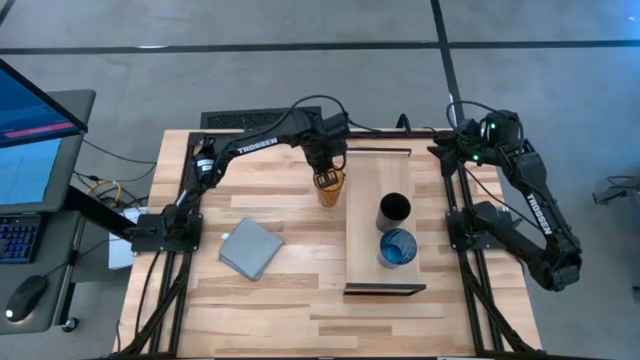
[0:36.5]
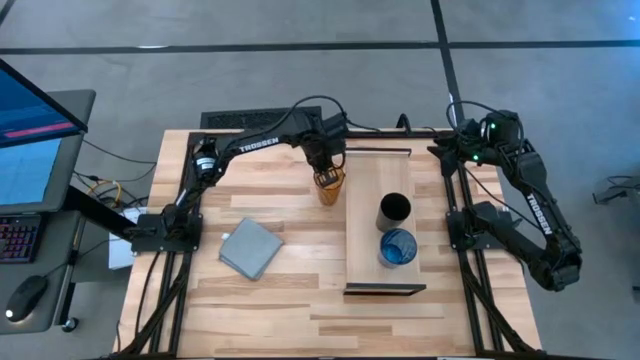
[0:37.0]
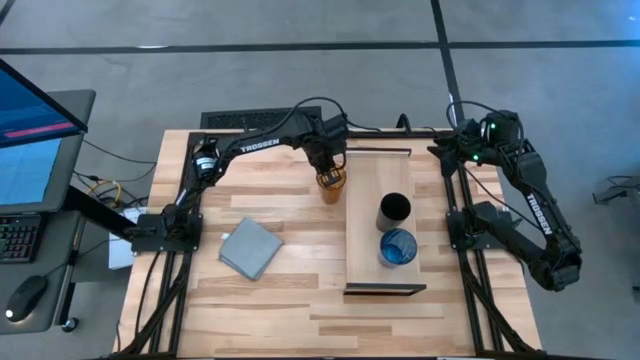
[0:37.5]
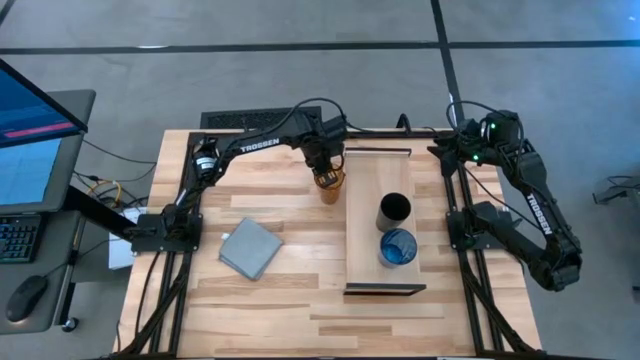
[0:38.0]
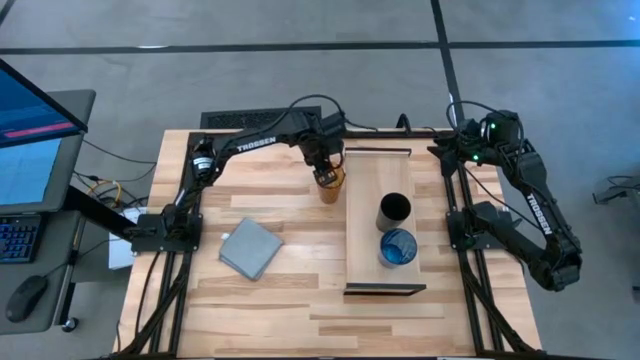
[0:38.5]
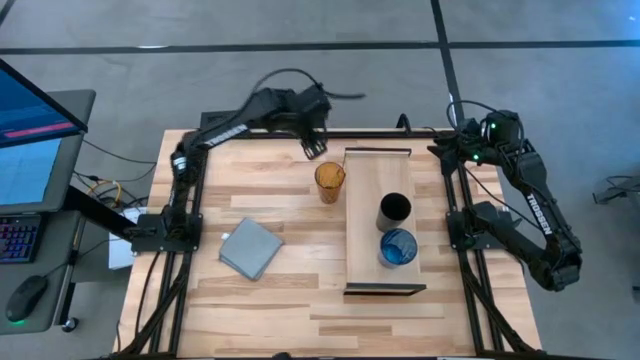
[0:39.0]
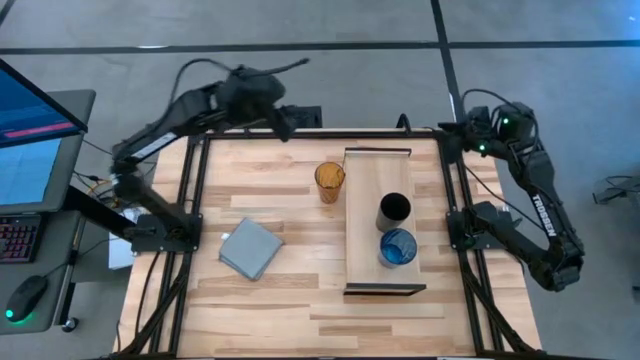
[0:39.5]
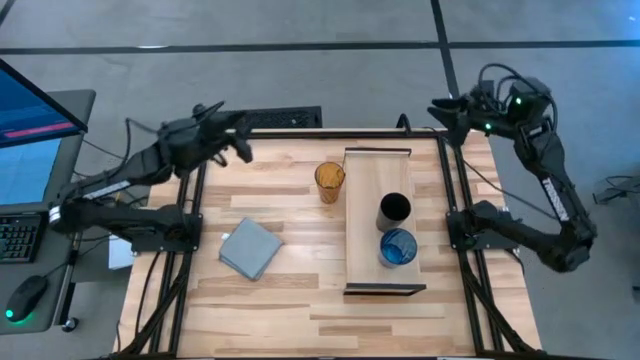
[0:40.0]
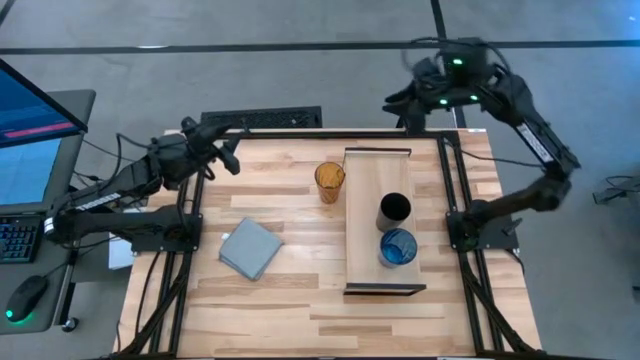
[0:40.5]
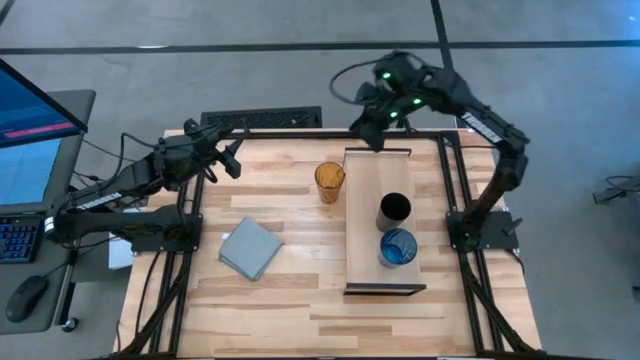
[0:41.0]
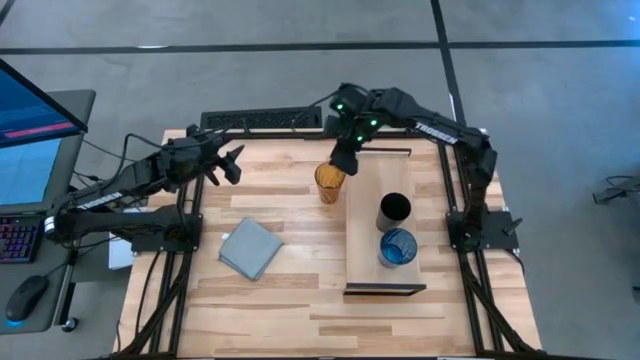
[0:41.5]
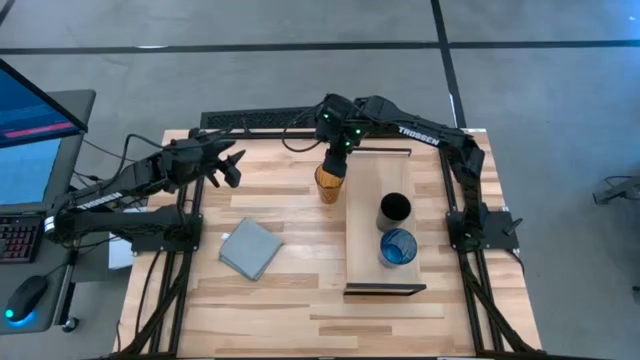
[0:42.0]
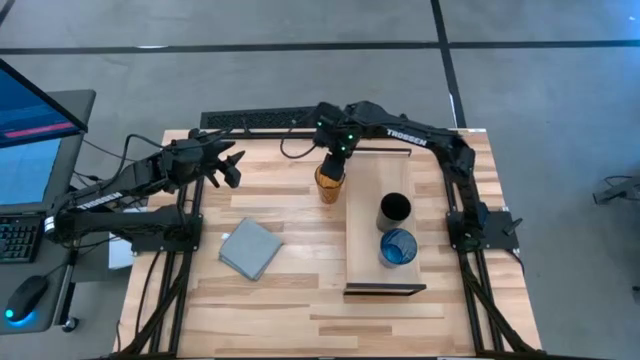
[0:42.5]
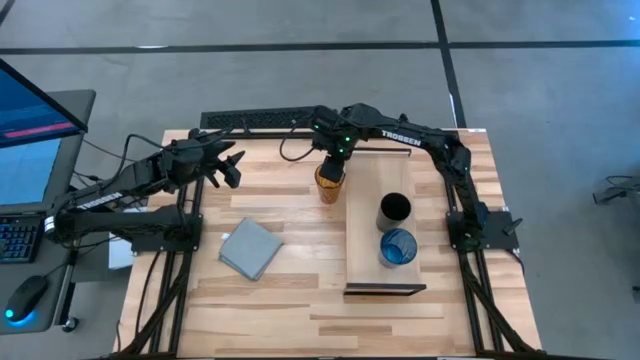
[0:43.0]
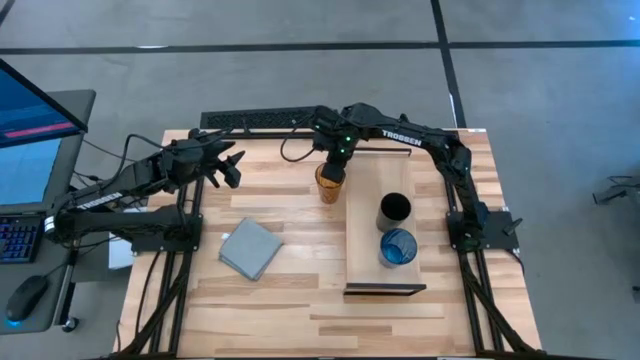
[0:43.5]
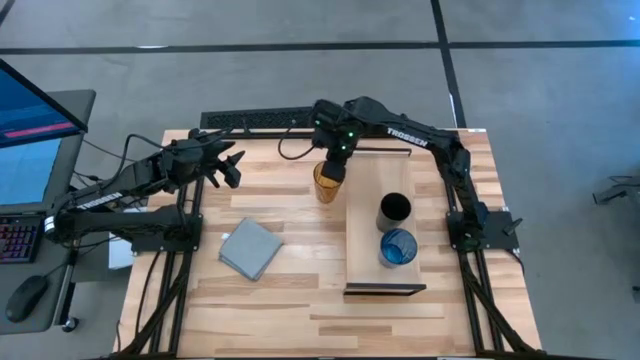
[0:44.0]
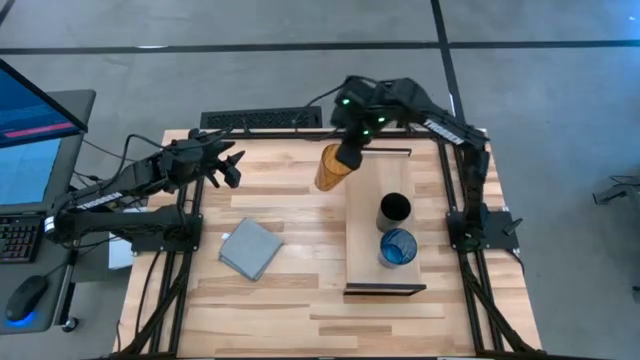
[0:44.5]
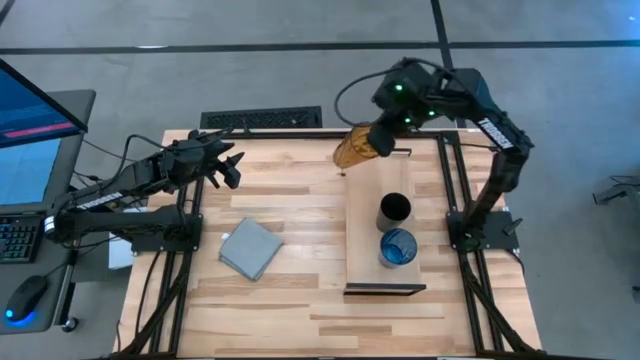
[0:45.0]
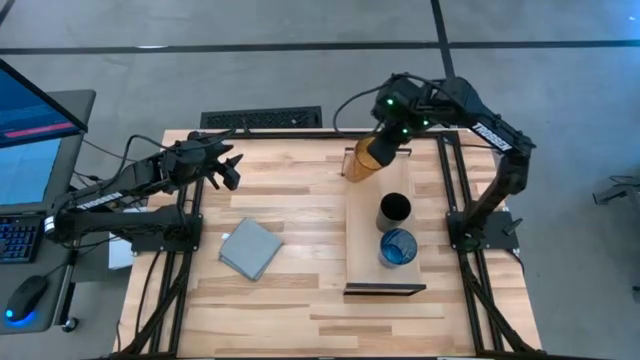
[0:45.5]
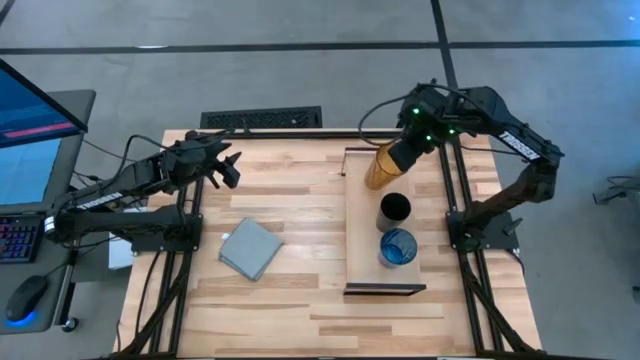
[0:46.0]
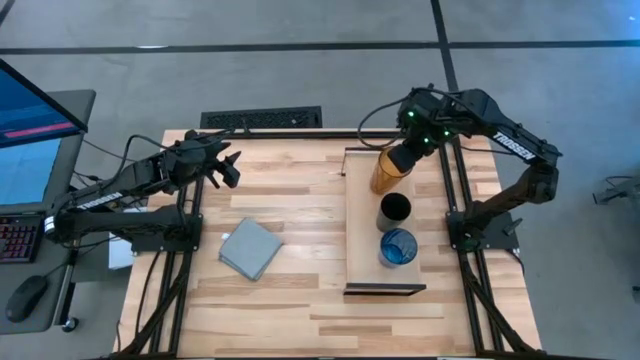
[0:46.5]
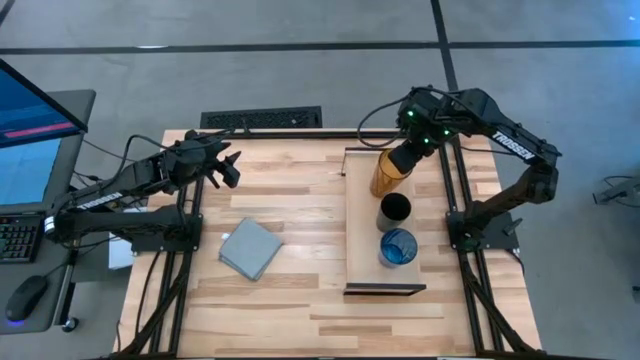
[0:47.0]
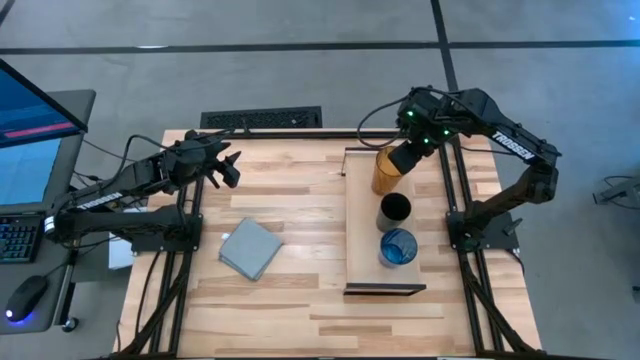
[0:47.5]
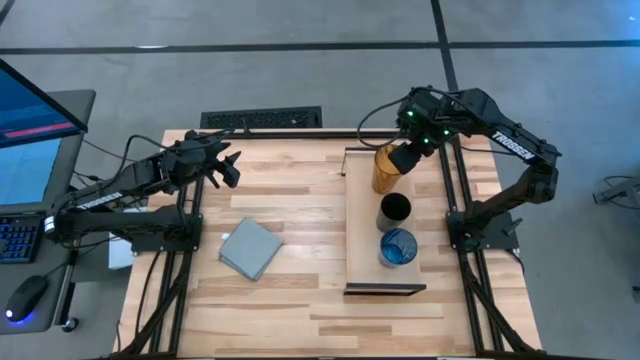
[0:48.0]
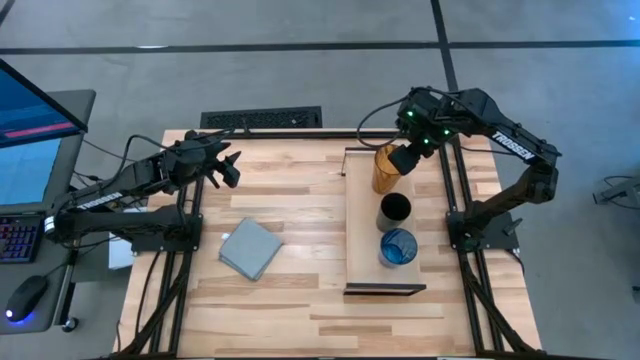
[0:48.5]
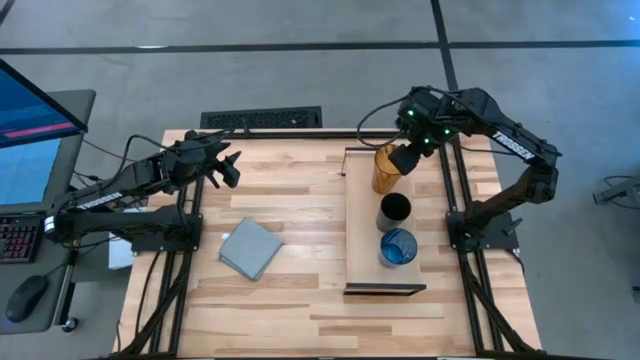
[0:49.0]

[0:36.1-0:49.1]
Task: Stack small to large cups/mugs on shelf
Put the brown cup on the shelf

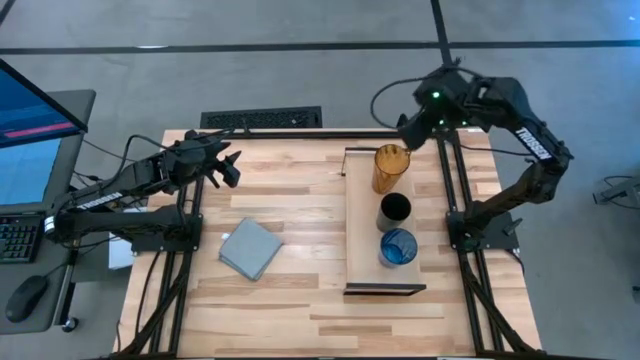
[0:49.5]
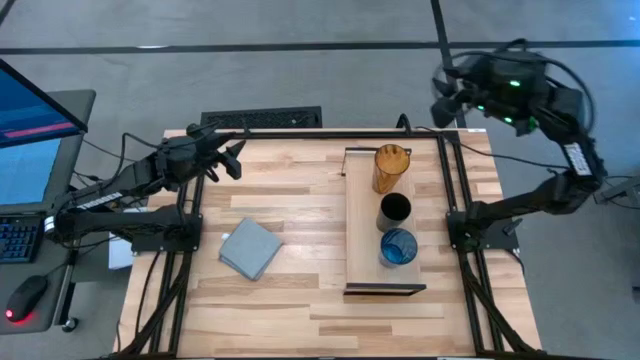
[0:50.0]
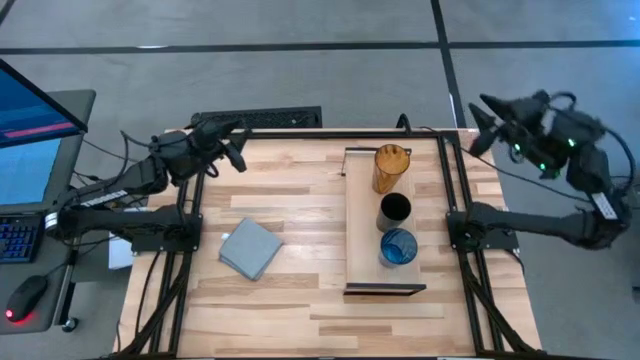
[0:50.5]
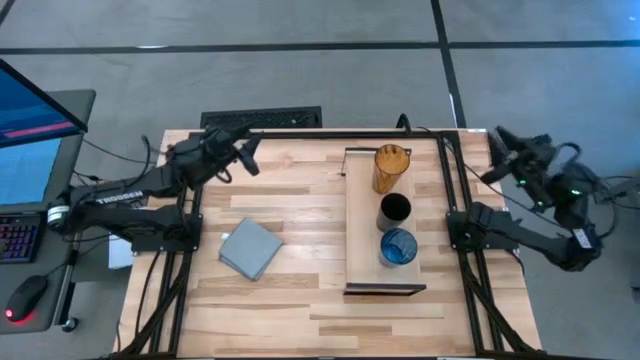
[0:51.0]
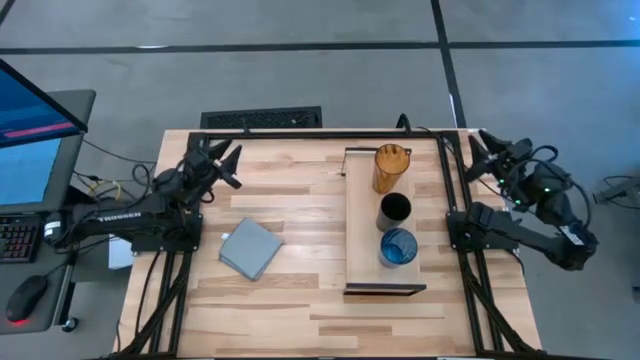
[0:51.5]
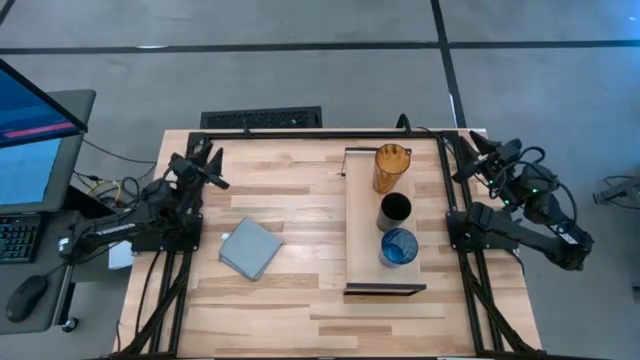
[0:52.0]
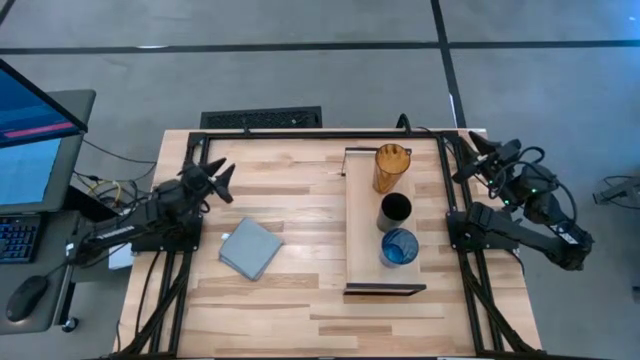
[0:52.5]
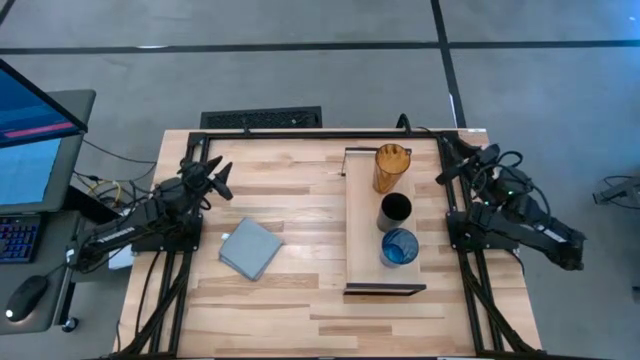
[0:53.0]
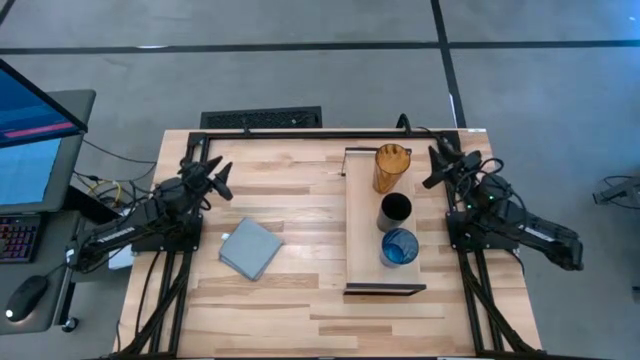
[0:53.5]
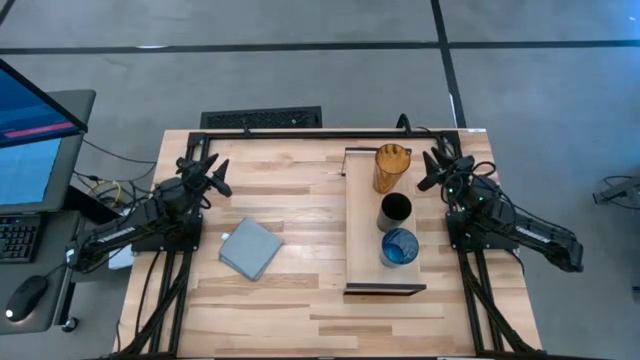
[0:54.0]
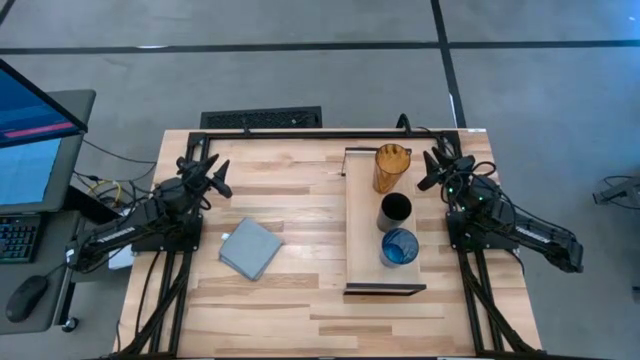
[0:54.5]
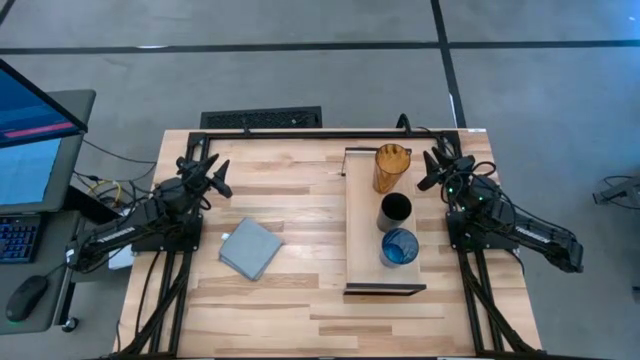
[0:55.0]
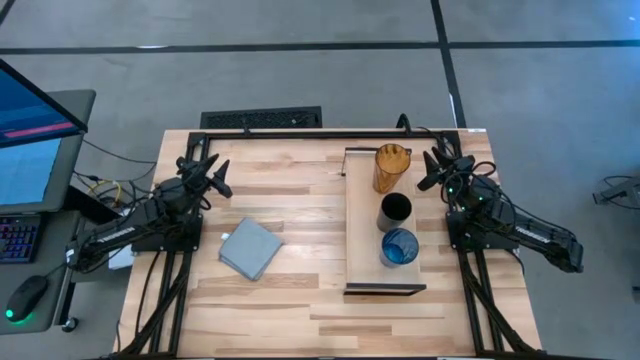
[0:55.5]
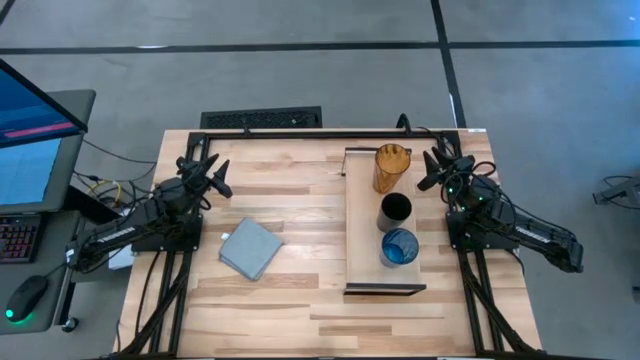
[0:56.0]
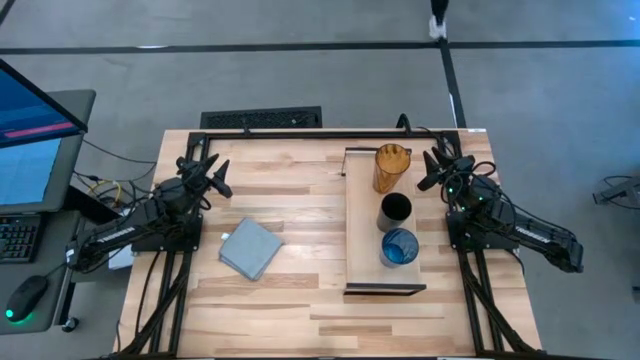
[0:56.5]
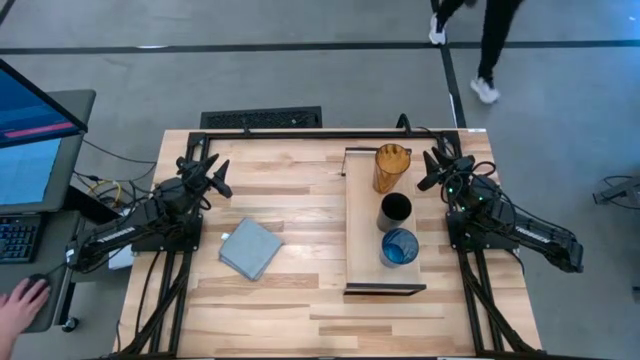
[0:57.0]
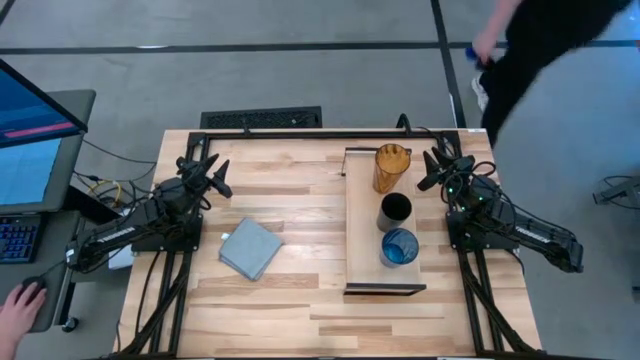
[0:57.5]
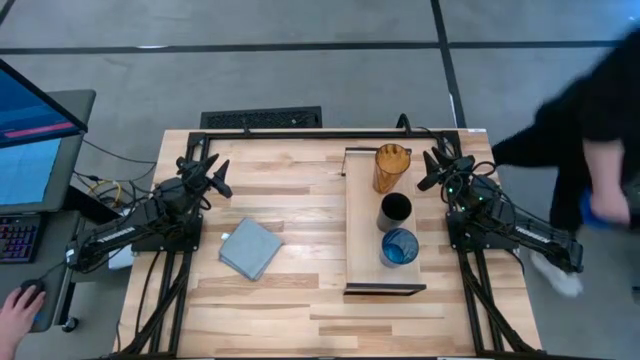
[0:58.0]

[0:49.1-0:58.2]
Return to Home Position
